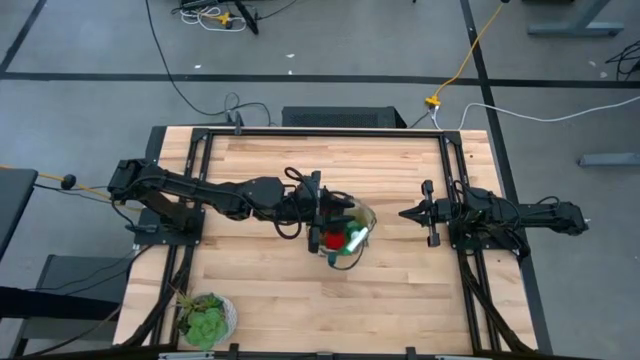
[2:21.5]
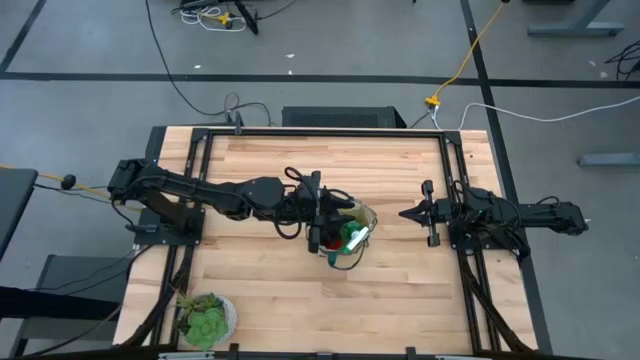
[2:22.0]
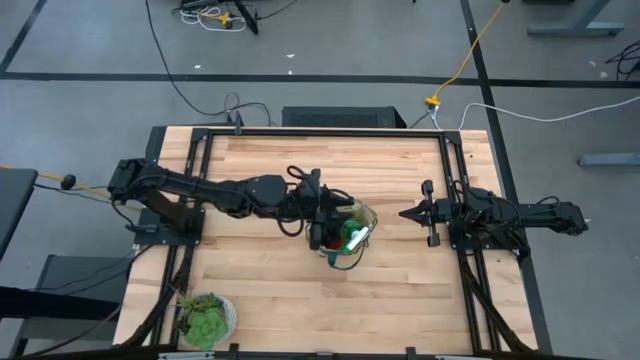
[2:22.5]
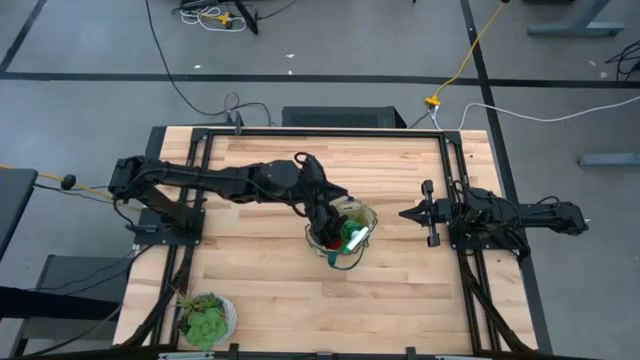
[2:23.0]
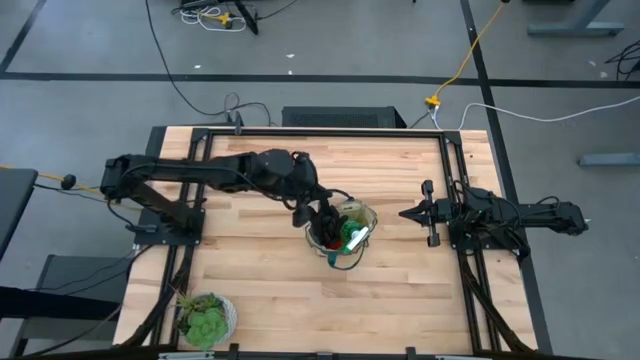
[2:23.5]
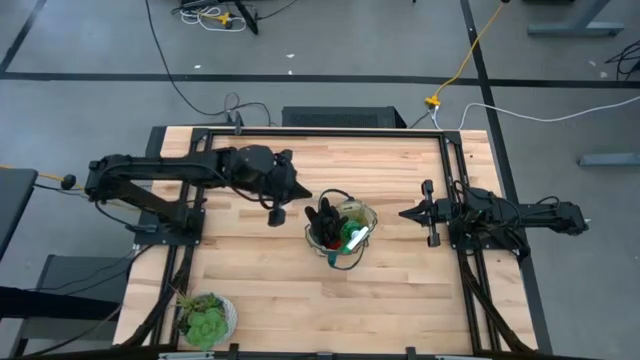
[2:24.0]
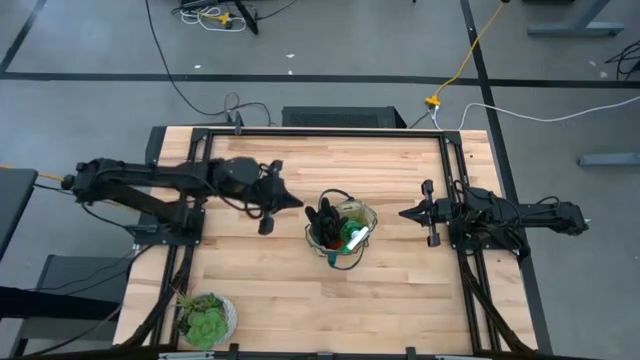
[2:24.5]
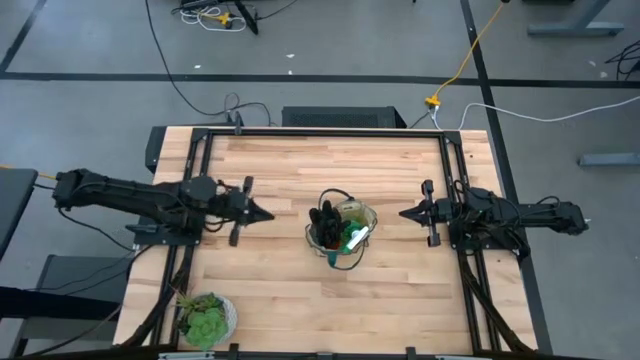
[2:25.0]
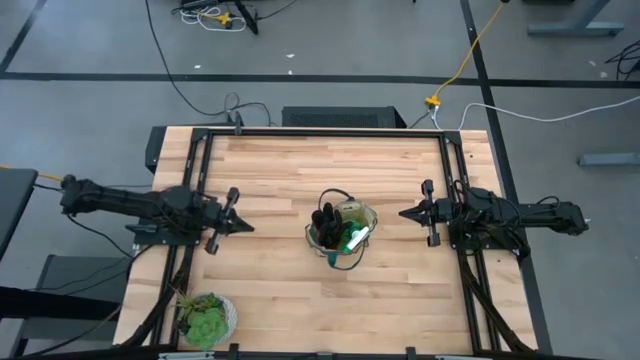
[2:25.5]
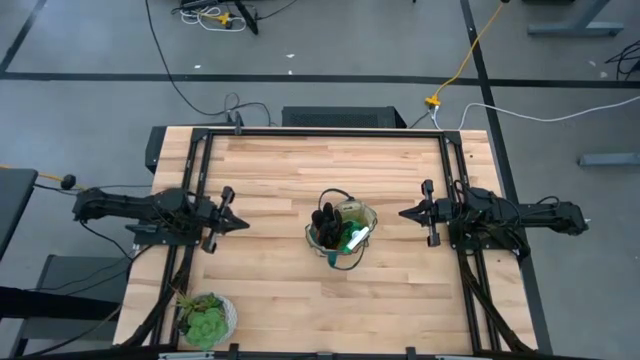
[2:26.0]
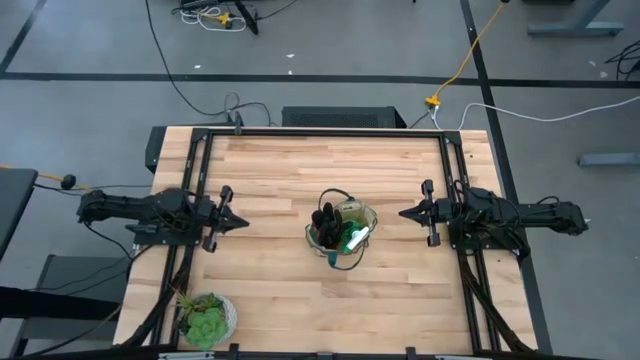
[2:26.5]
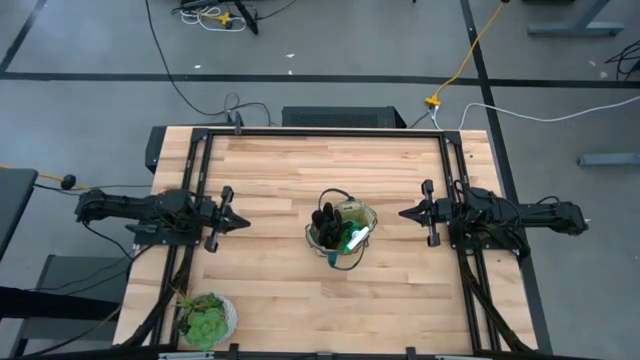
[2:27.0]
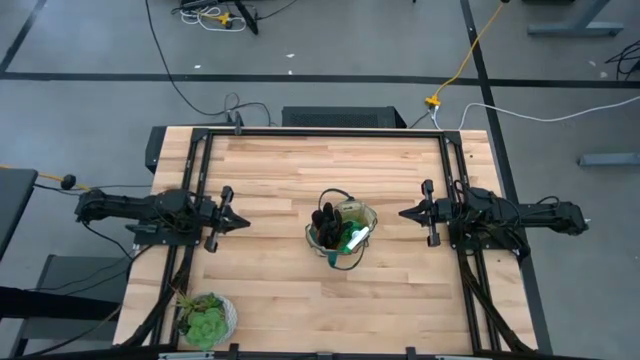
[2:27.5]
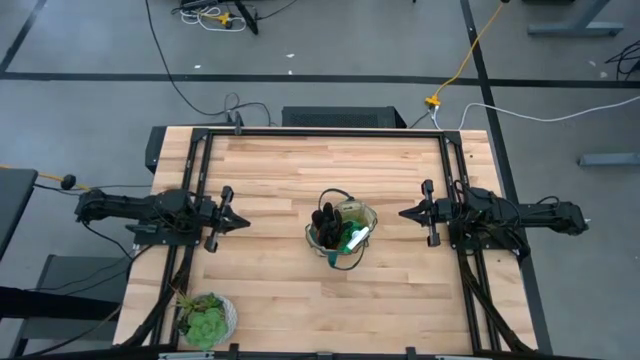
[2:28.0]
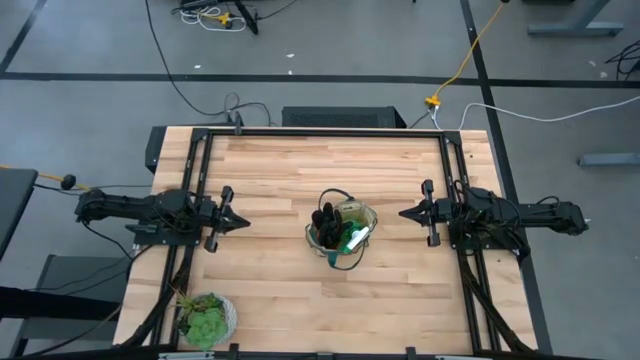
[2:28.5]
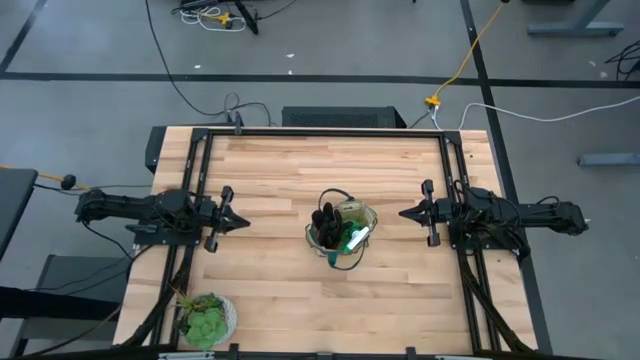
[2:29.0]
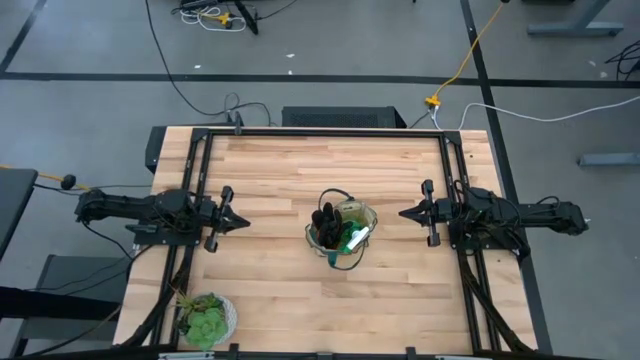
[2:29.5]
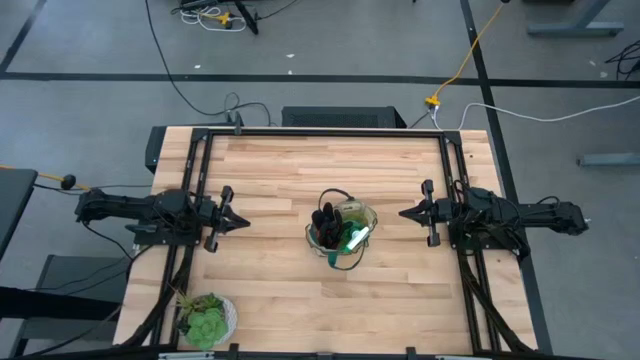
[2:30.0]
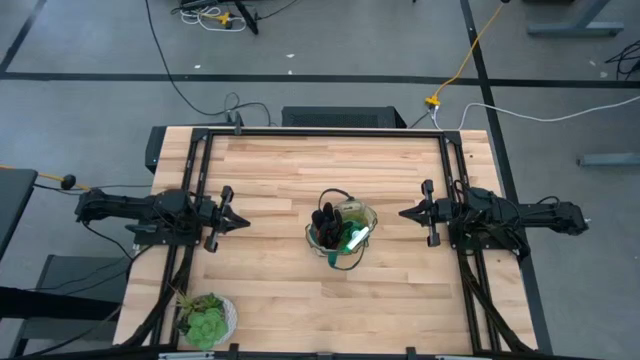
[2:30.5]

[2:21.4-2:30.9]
Task: Pick & Place Garden tools in Gardening bag
Return to Home Position

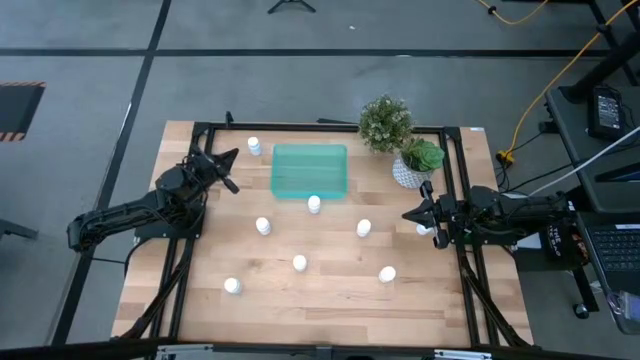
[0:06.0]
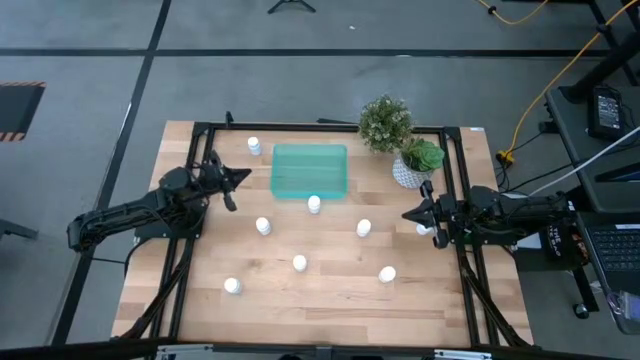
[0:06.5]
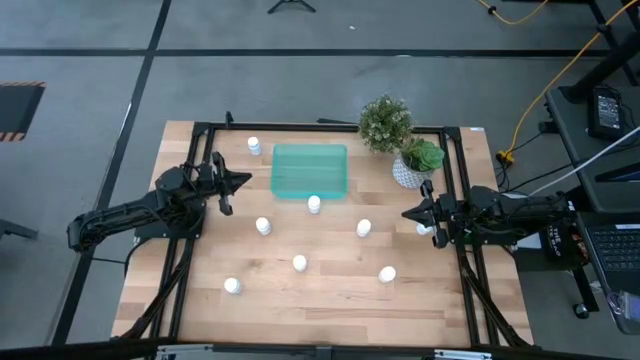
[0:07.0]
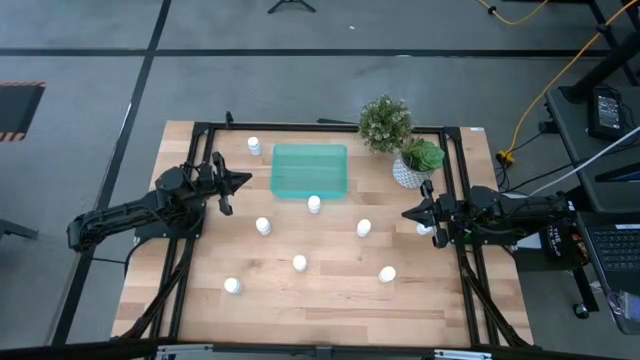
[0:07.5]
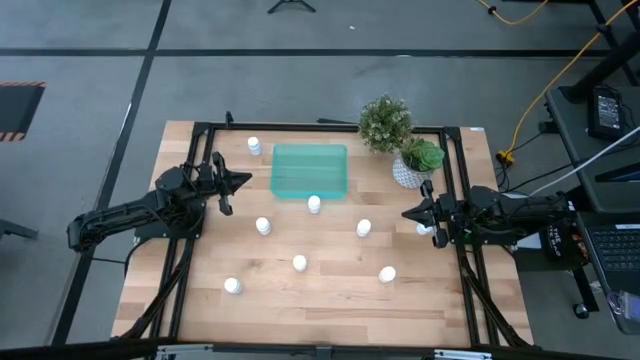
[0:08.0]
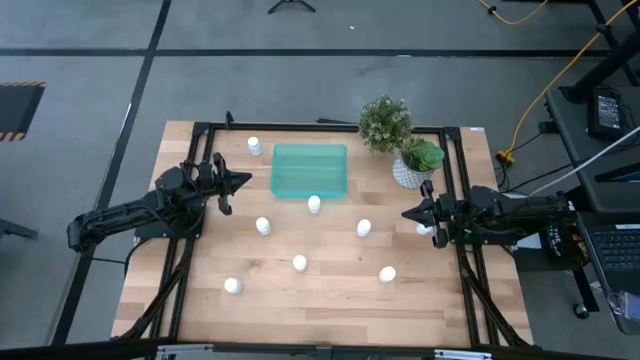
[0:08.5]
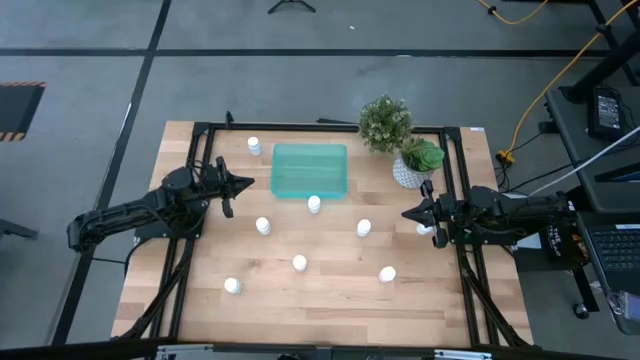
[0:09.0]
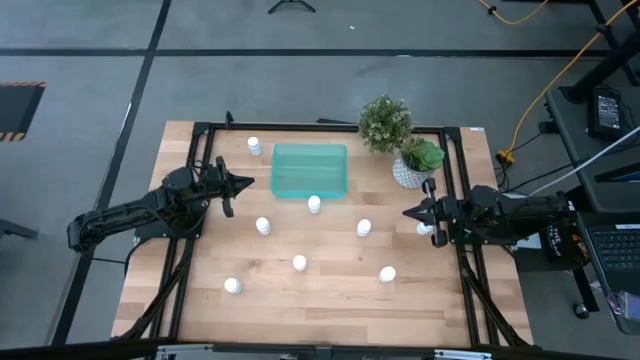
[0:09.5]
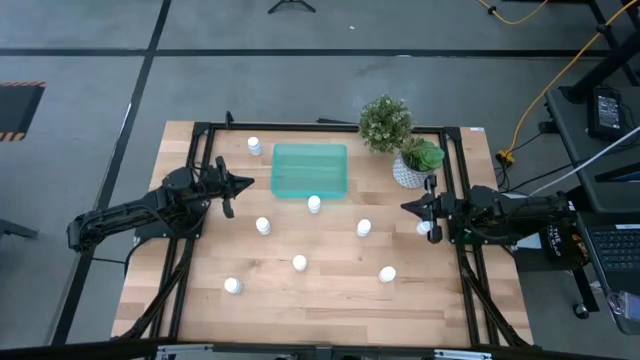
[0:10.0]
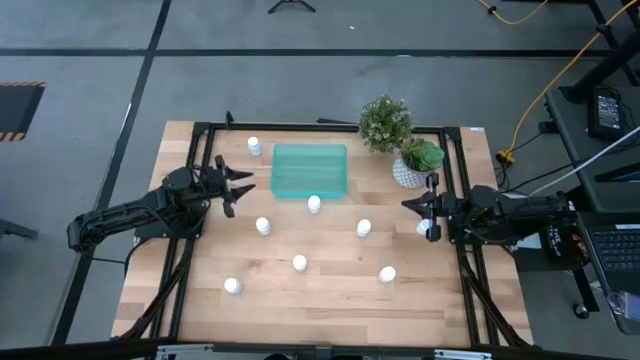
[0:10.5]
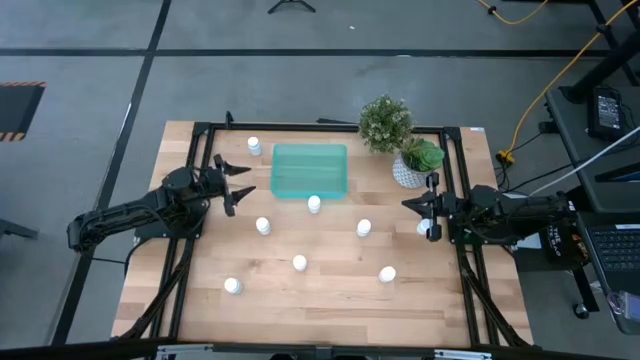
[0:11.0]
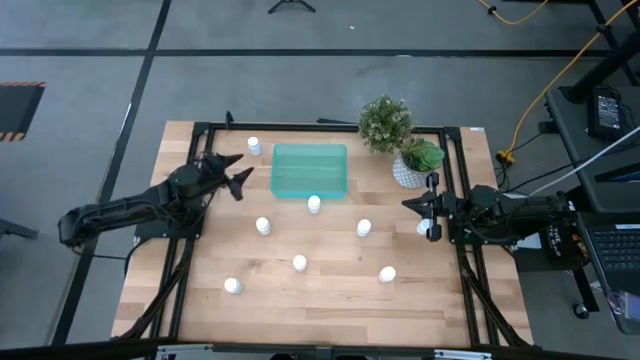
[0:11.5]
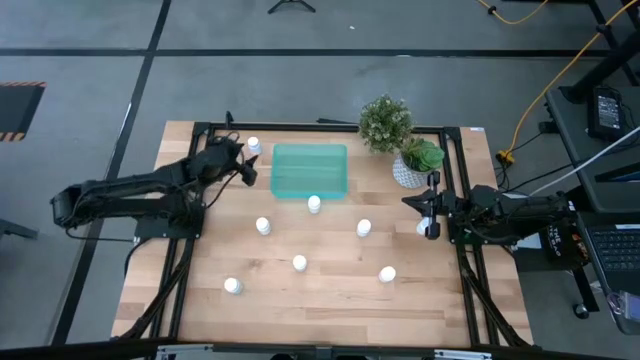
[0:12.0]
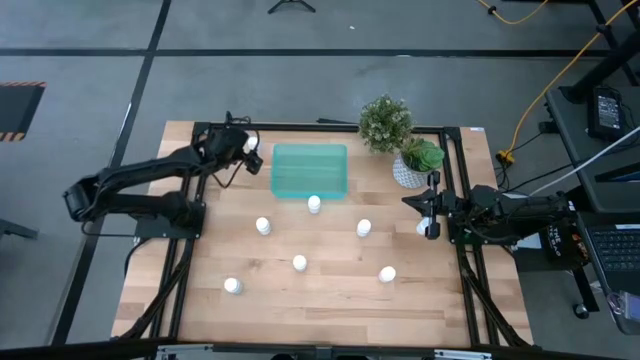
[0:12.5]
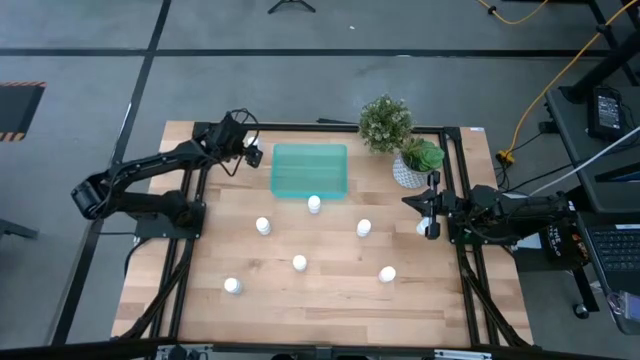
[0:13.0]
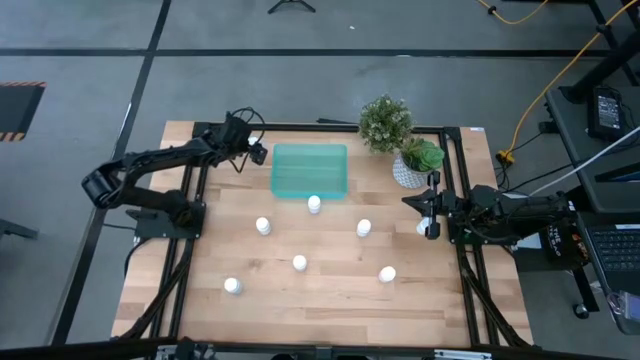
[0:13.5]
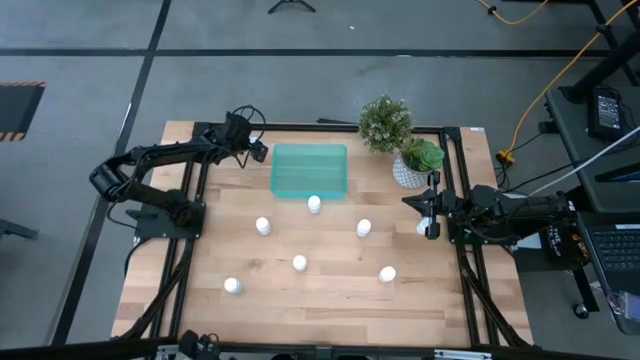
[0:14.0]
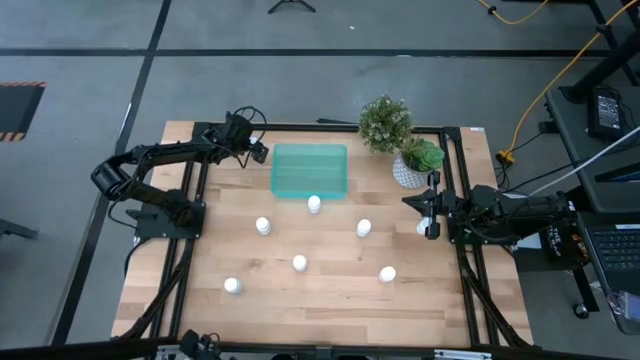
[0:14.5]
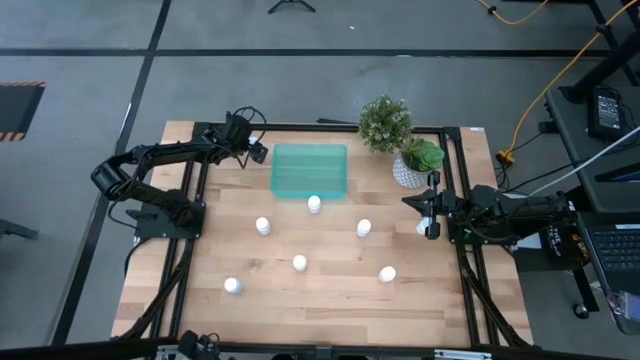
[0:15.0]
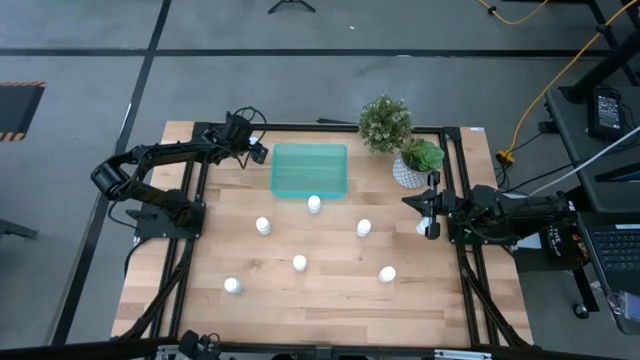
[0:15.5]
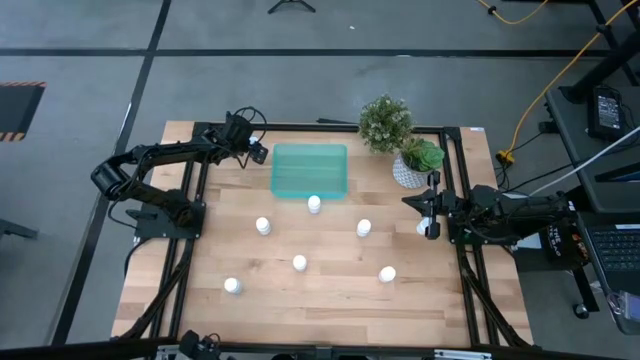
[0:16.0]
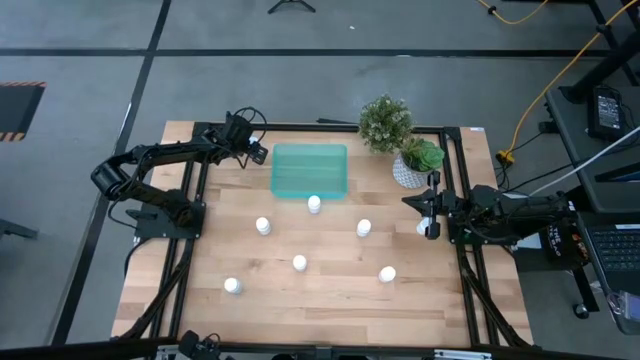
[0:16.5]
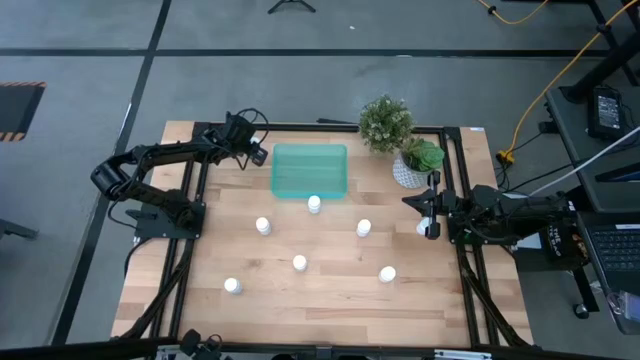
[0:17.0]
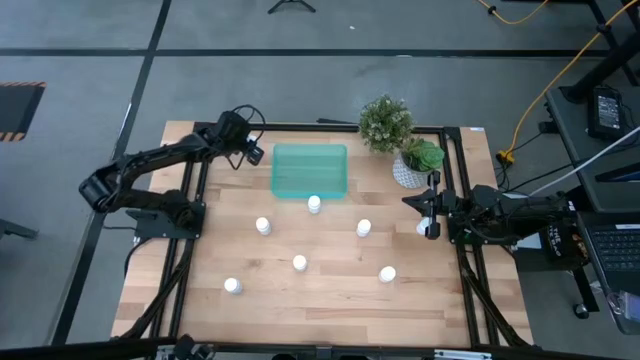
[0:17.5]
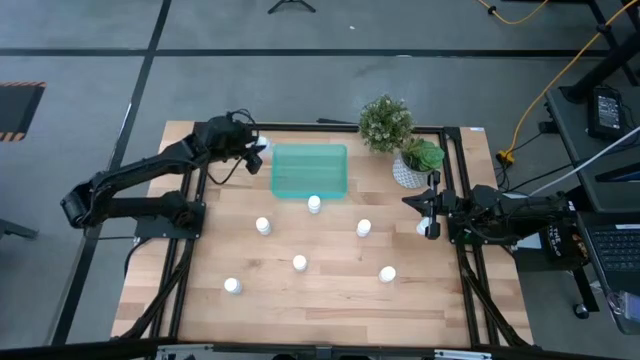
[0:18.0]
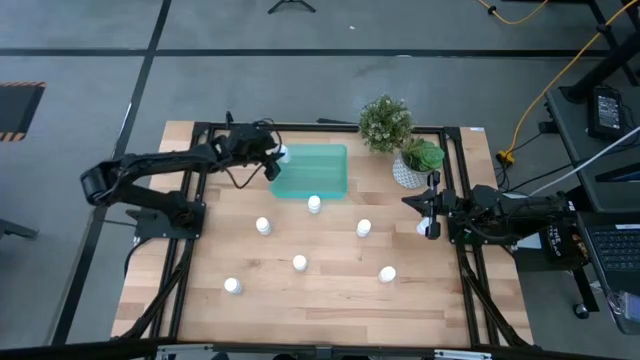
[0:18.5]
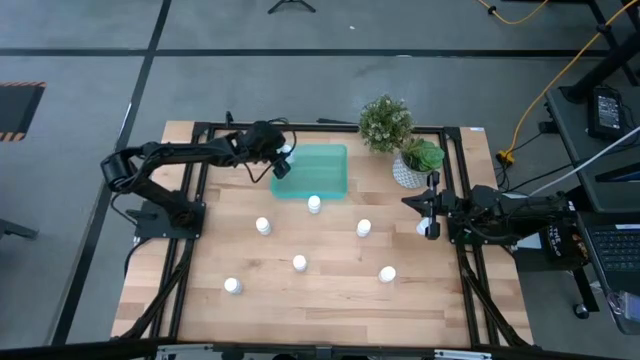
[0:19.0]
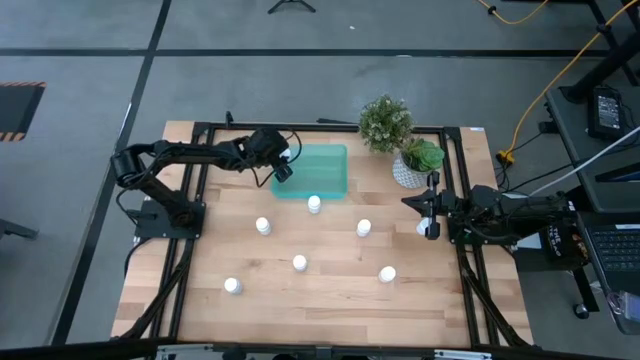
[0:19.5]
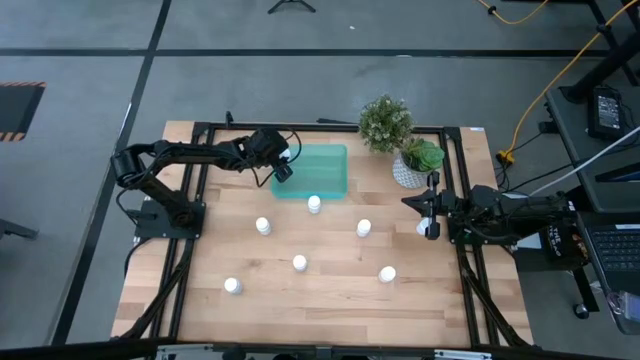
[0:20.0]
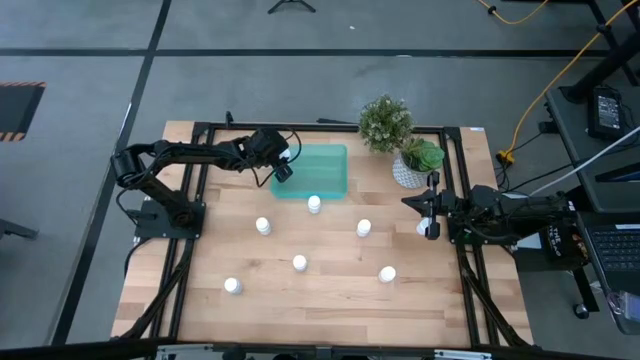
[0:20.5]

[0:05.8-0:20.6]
Task: Pick and place pill bottles into a basket
Put the white pill bottle into the green bin
